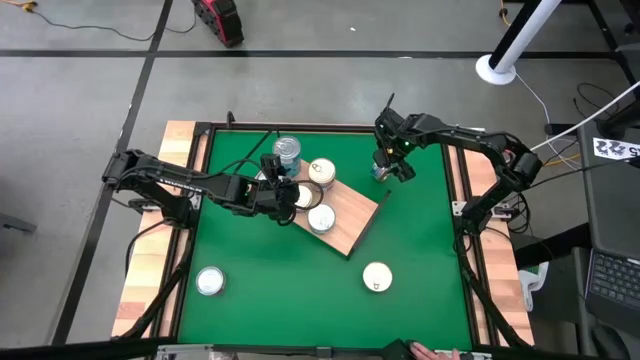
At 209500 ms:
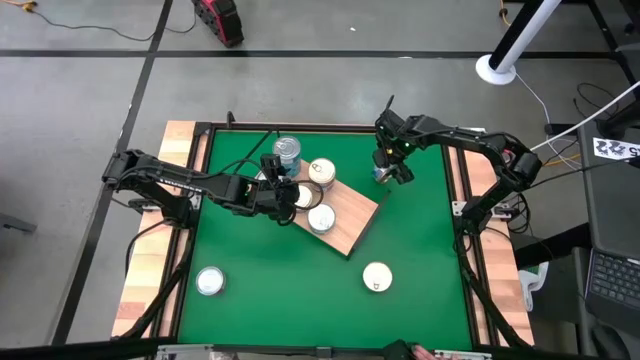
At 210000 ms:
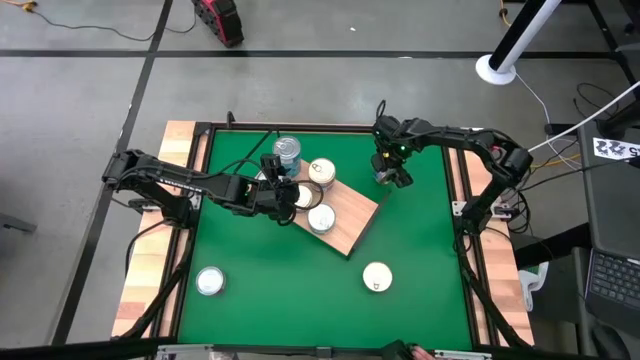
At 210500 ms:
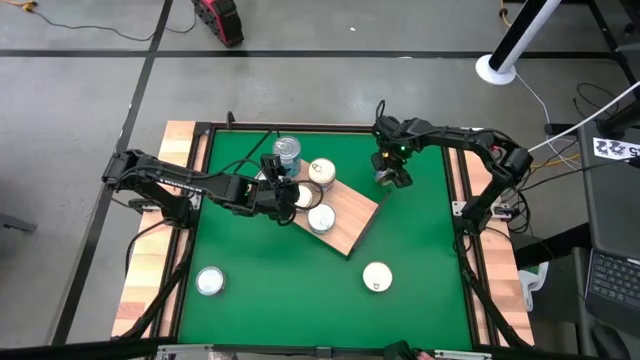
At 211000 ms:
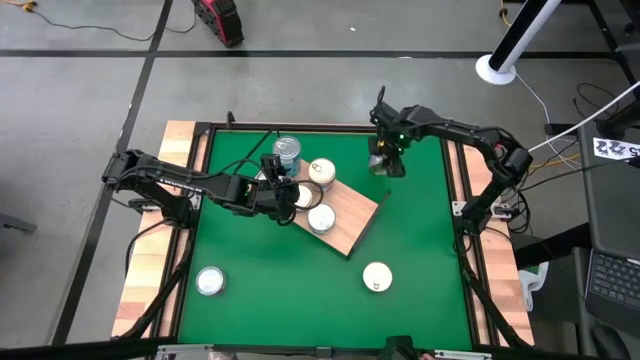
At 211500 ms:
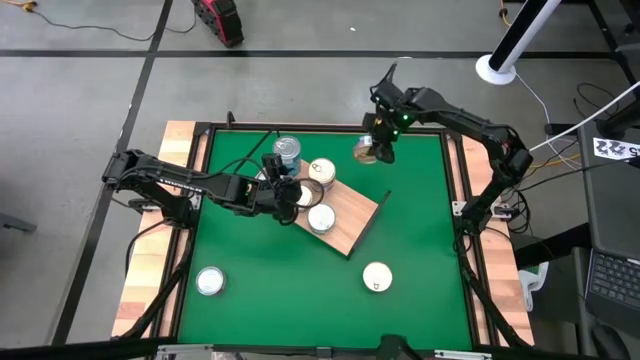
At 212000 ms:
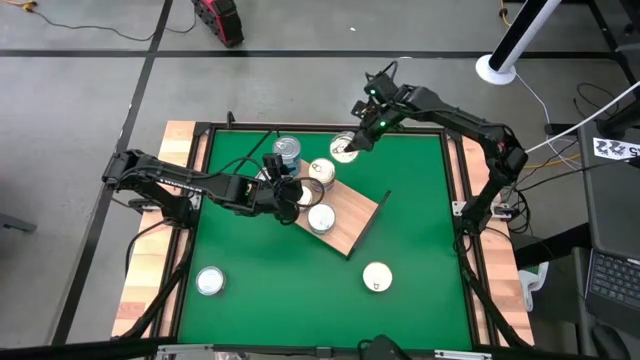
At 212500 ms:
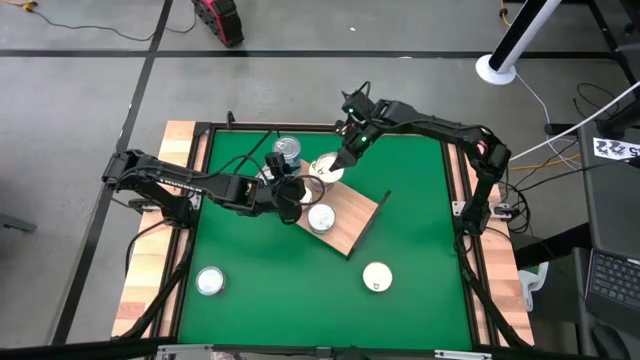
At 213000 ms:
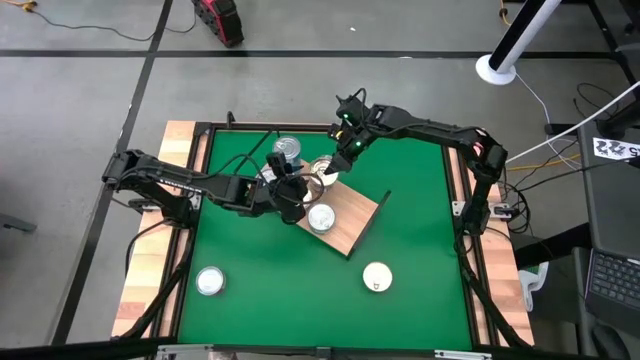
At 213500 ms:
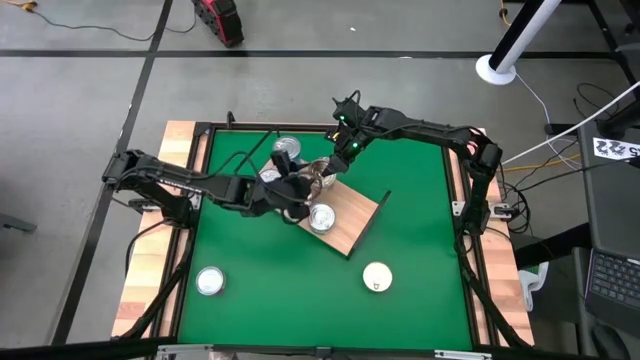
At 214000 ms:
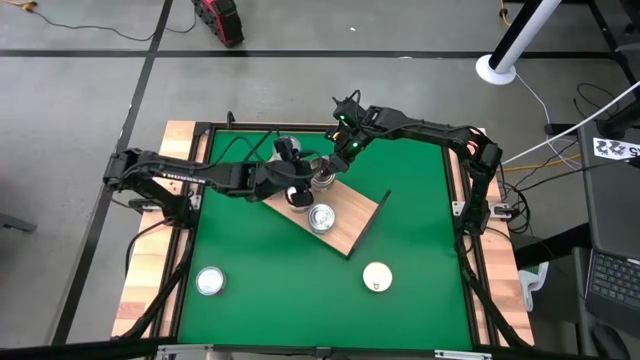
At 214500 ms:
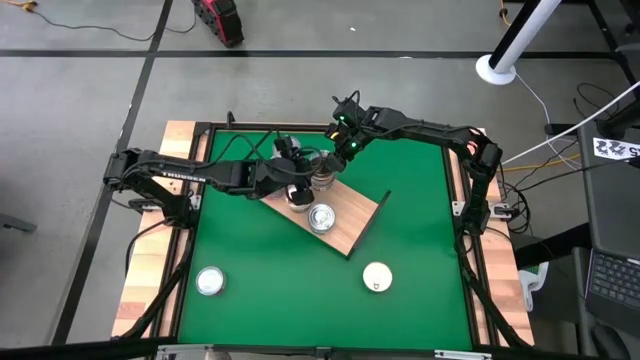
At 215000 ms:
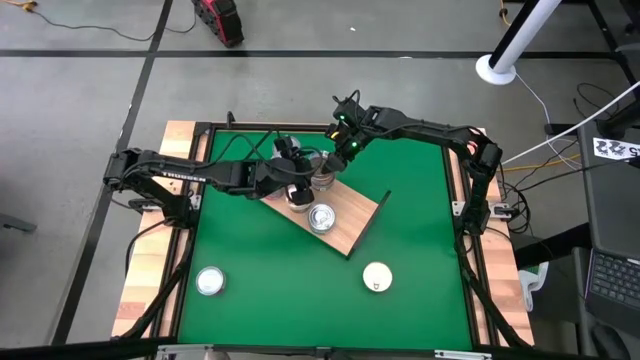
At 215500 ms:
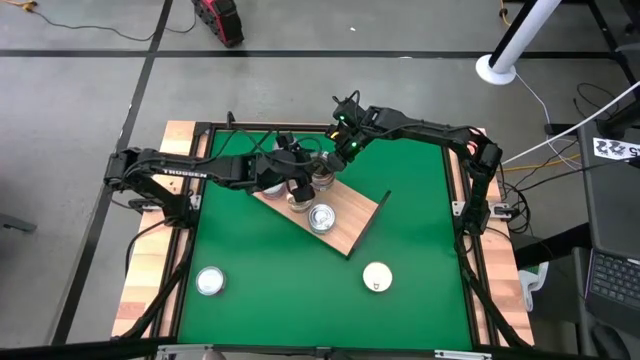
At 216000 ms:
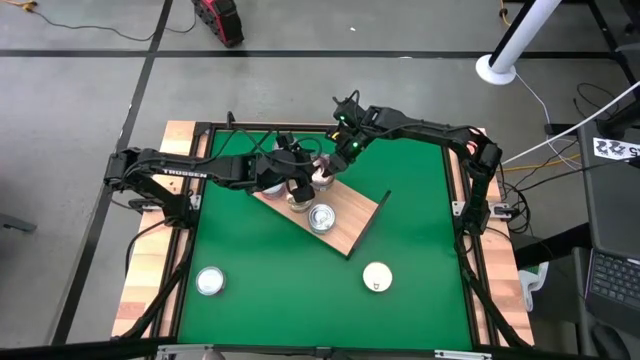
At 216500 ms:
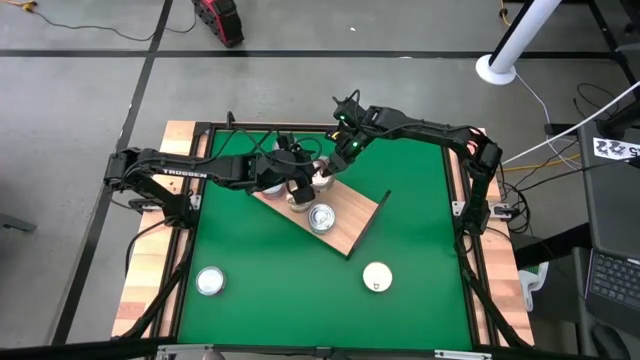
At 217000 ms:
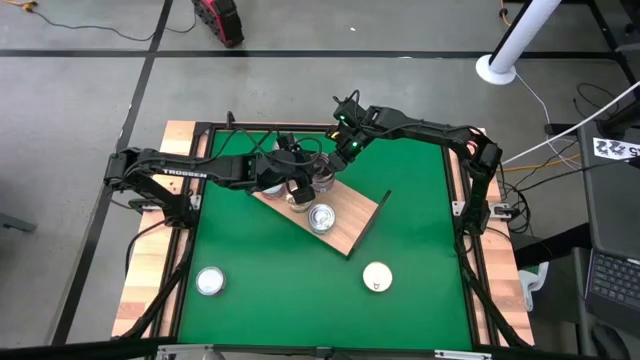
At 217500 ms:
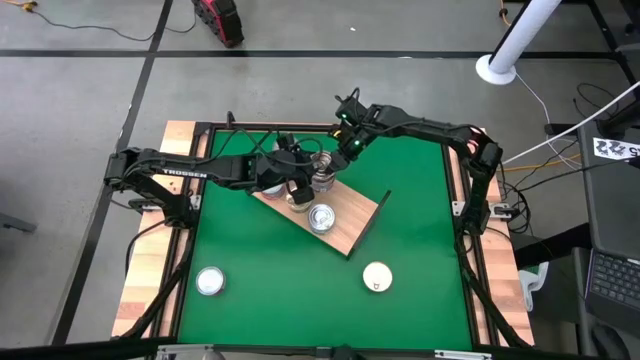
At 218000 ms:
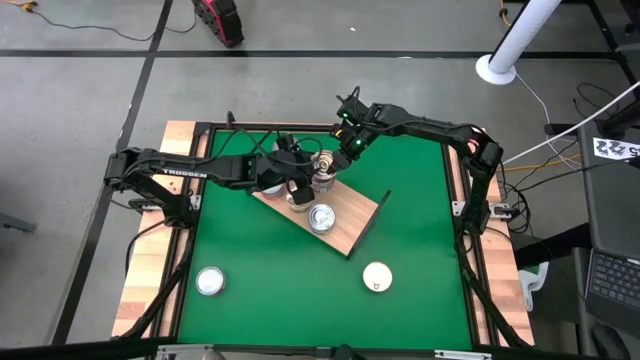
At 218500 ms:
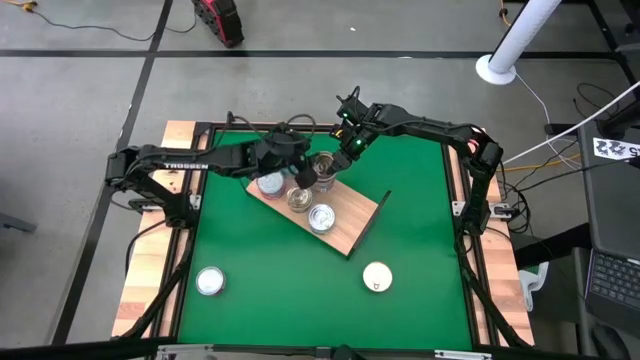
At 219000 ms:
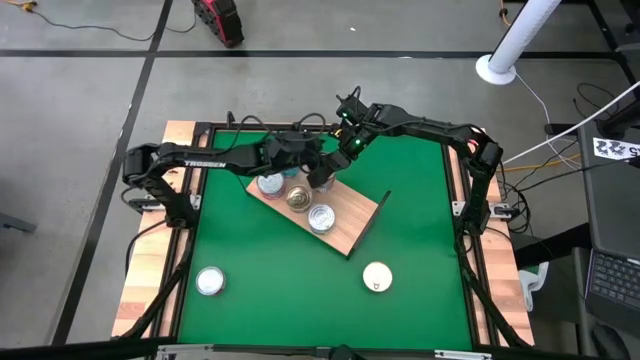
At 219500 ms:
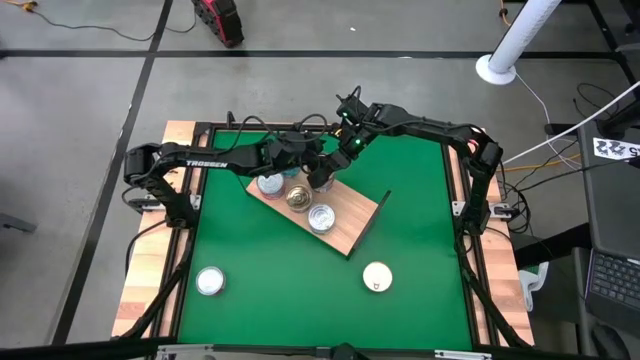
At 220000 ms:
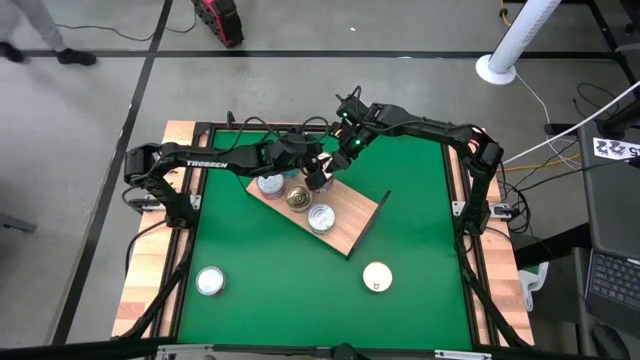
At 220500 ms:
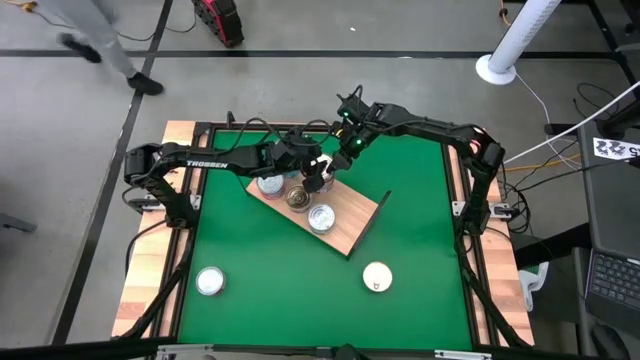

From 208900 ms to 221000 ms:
Task: Stack canned seafood by type on shelf
Stack the blue and pink tuna can on top of the blue and pink tuna can on the shelf

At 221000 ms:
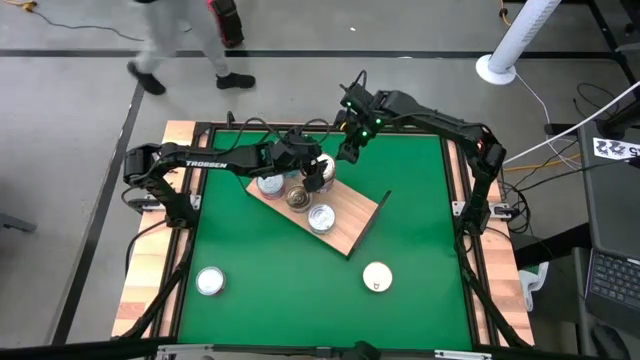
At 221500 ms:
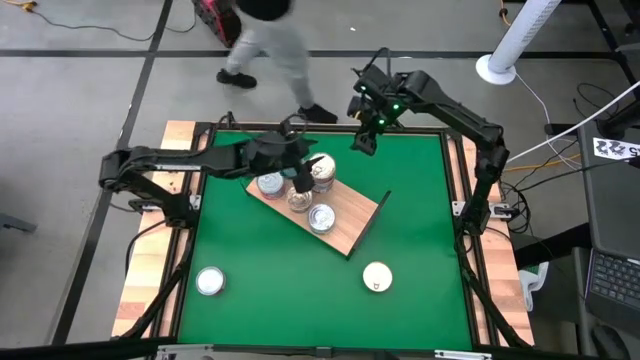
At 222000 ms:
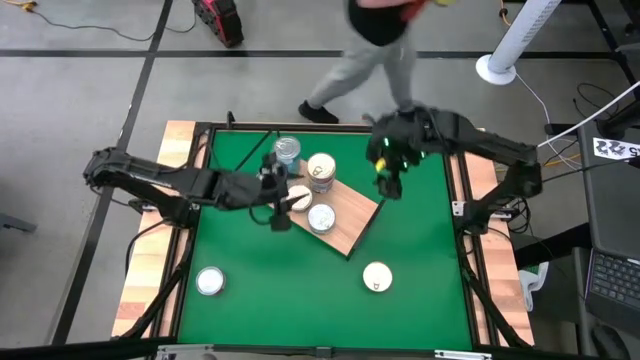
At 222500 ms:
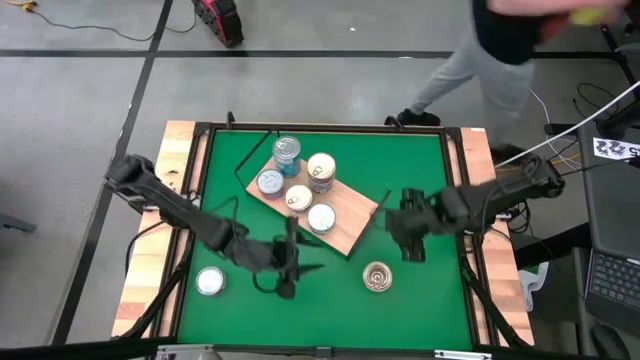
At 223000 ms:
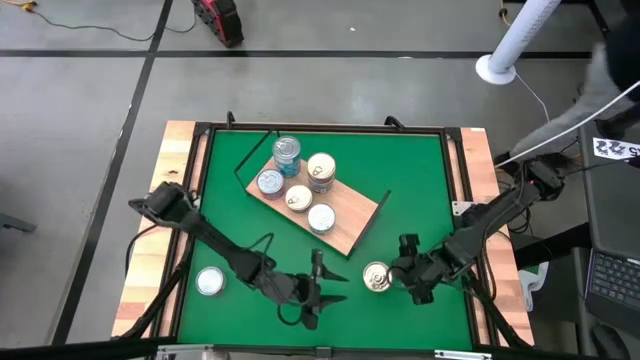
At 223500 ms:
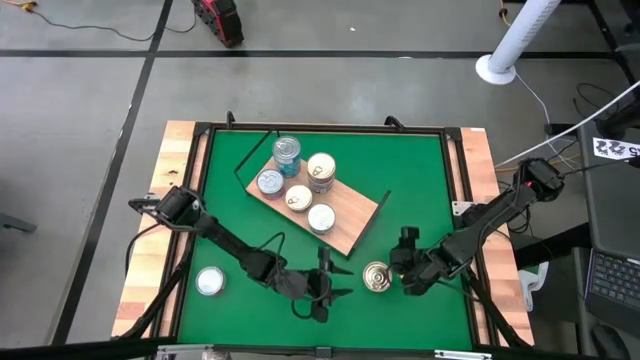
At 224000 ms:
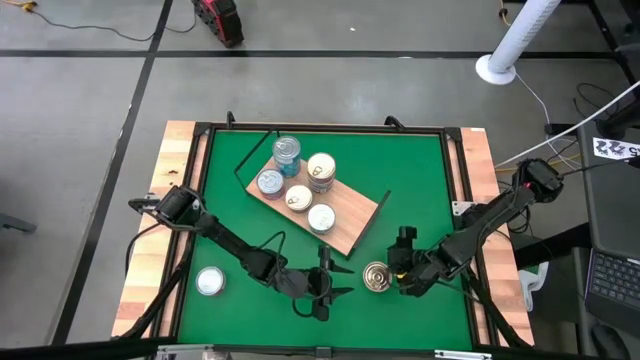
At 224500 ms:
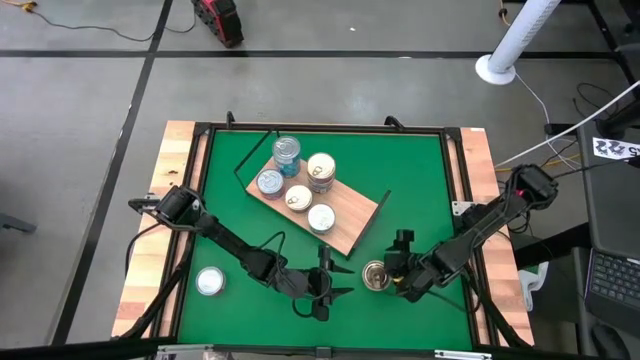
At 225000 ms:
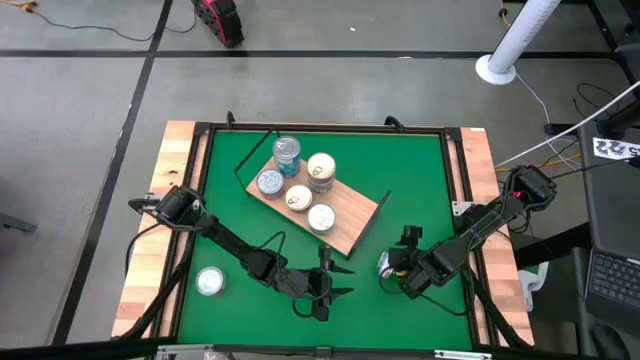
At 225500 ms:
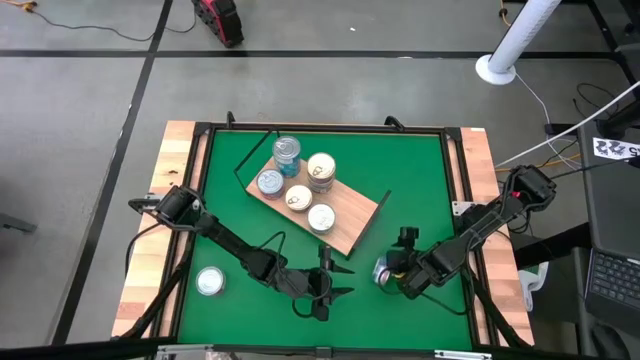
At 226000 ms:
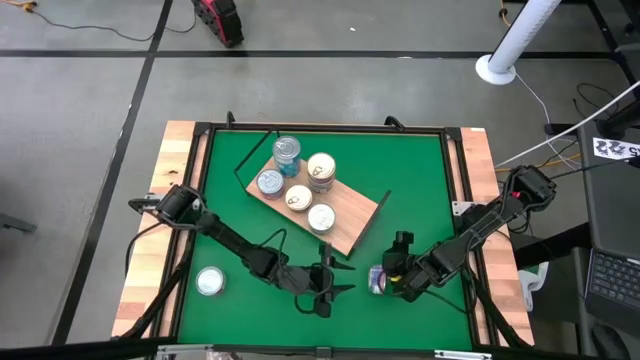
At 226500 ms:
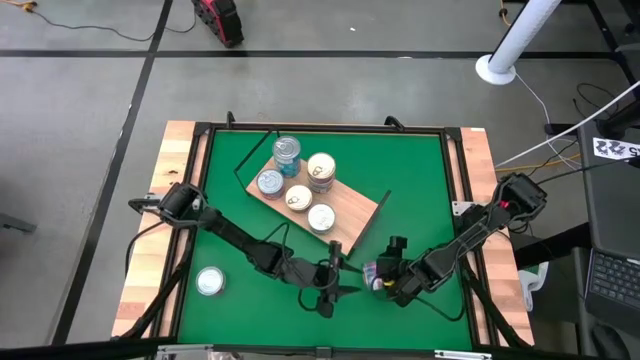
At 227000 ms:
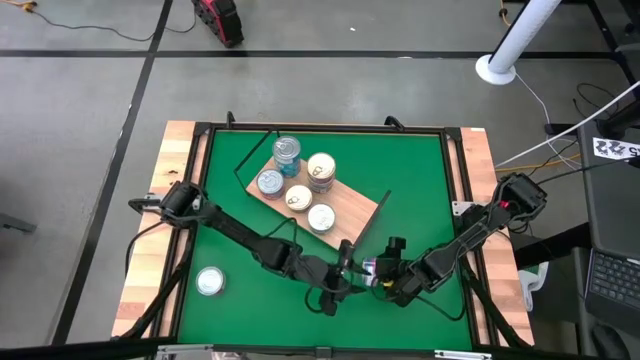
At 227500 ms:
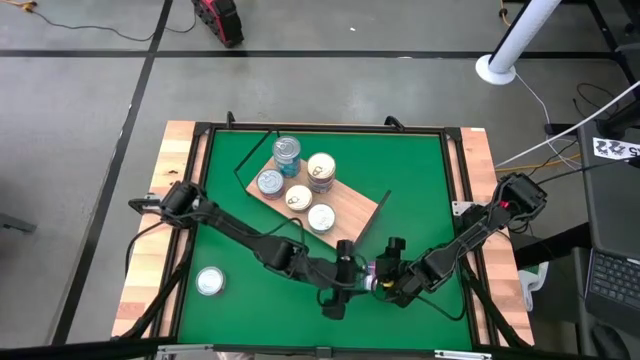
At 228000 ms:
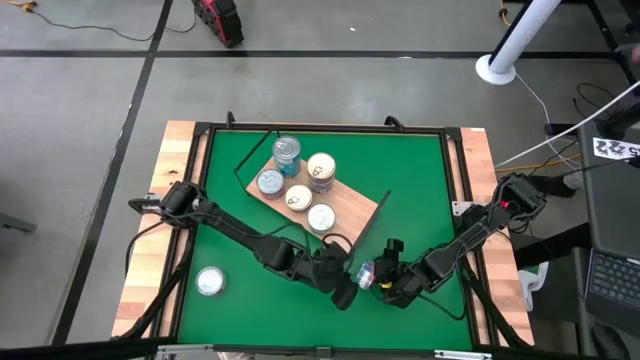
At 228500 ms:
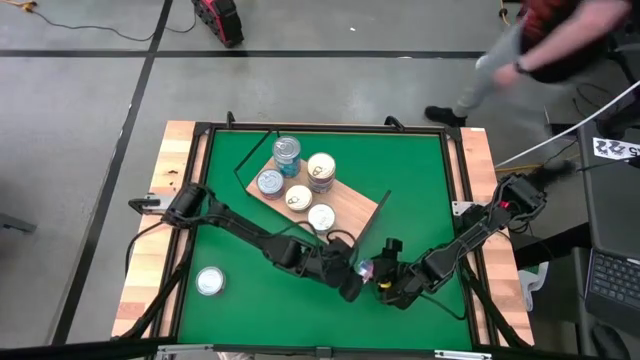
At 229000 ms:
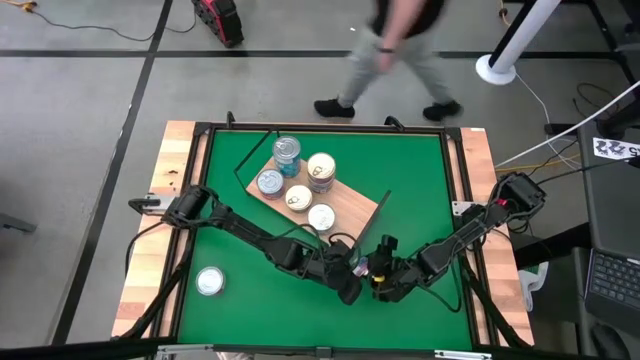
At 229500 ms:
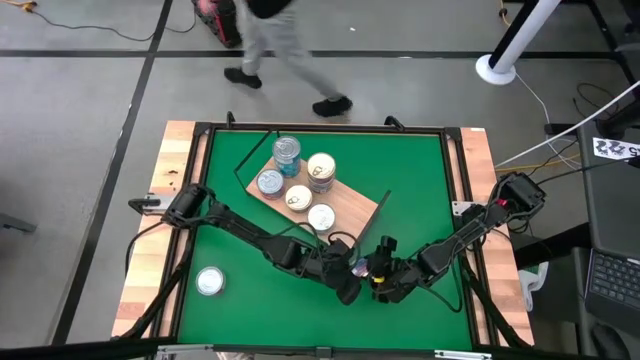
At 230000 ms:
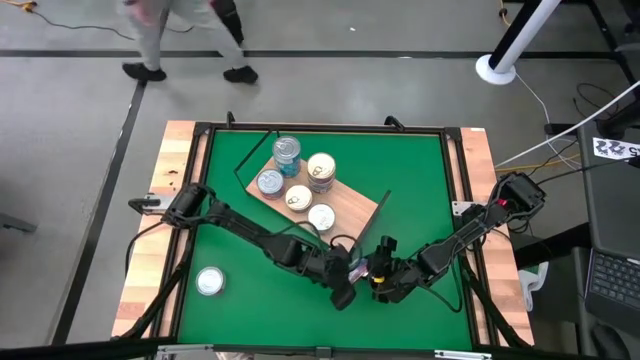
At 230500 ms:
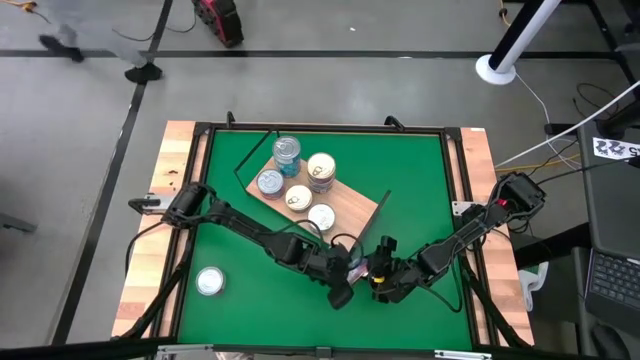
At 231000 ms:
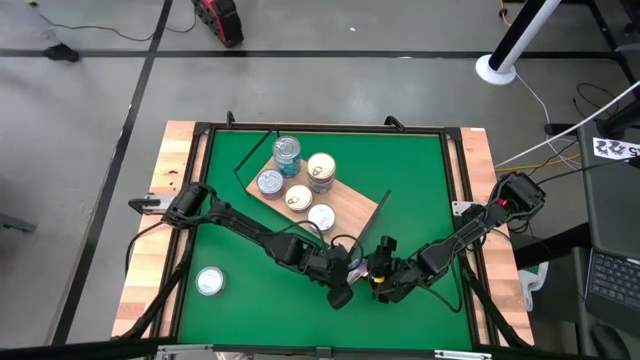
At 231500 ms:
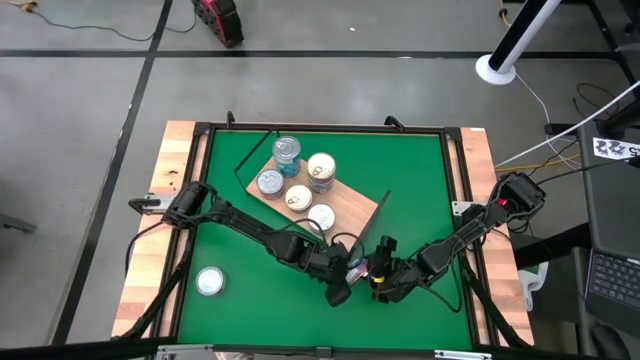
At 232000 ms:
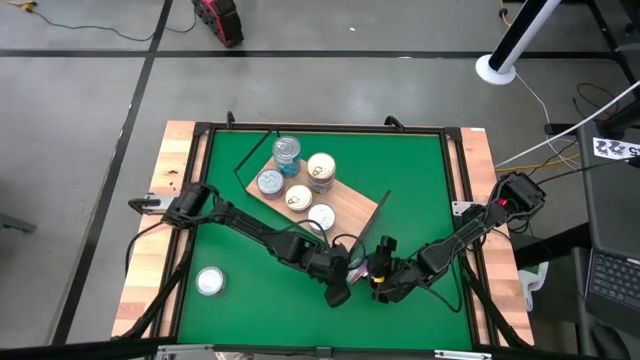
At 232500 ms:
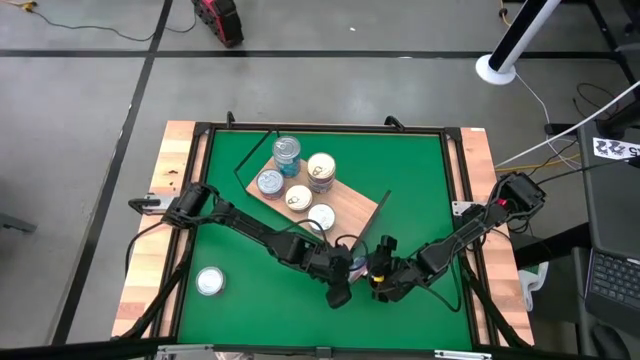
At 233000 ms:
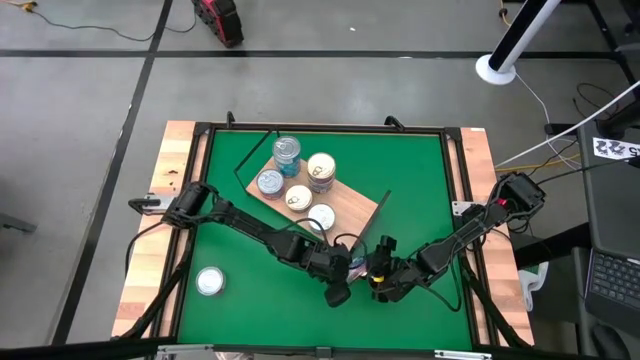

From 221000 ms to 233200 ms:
Stack the blue and pink tuna can on top of the blue and pink tuna can on the shelf
